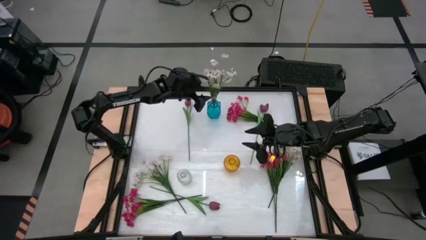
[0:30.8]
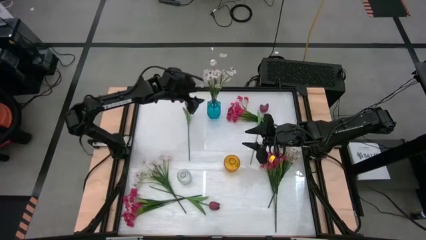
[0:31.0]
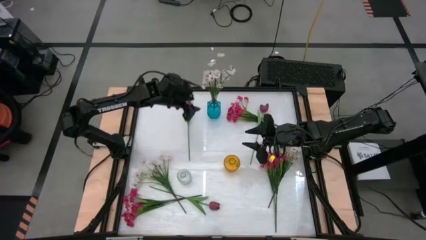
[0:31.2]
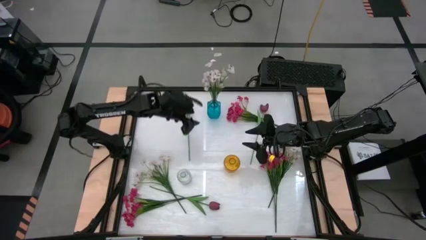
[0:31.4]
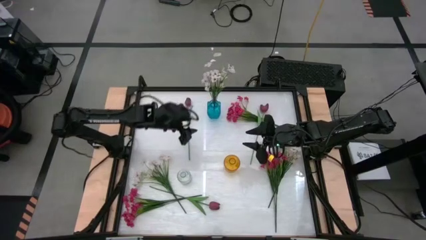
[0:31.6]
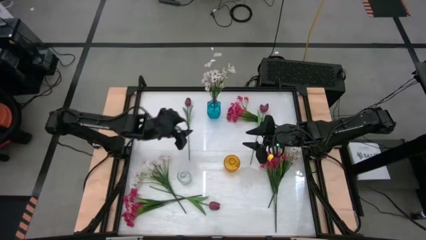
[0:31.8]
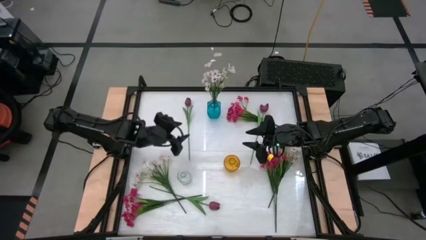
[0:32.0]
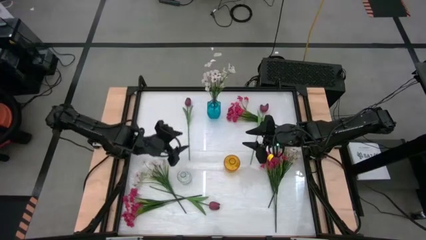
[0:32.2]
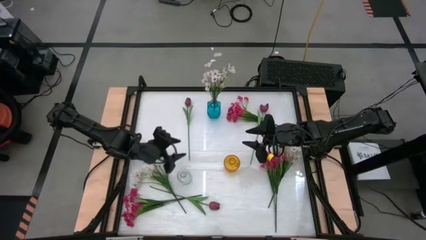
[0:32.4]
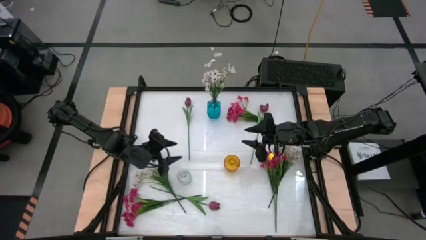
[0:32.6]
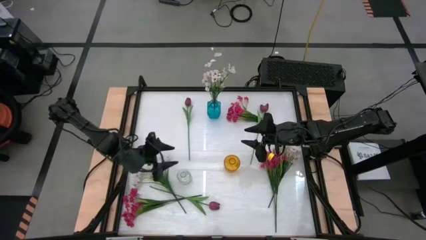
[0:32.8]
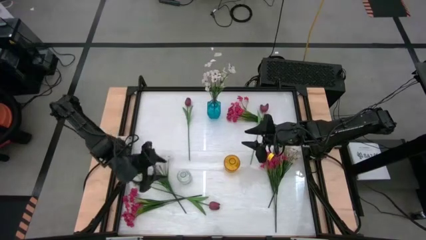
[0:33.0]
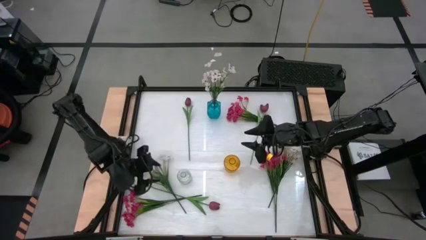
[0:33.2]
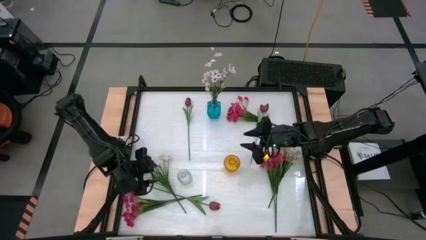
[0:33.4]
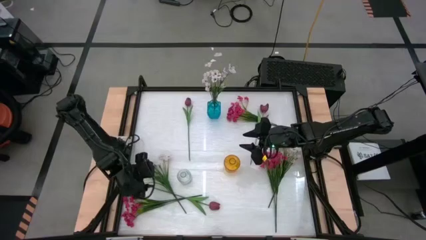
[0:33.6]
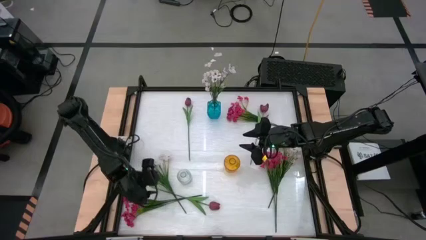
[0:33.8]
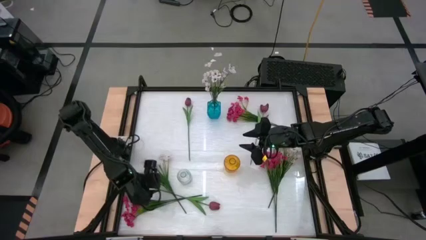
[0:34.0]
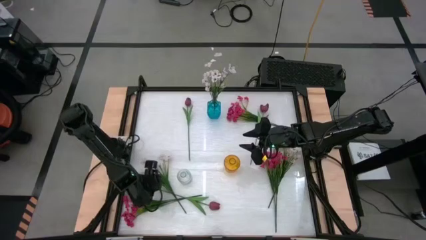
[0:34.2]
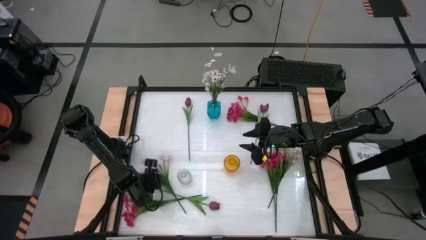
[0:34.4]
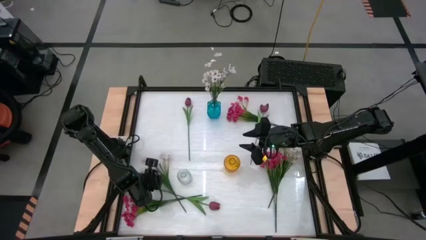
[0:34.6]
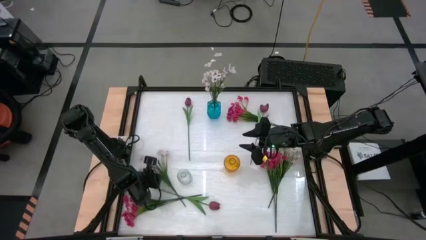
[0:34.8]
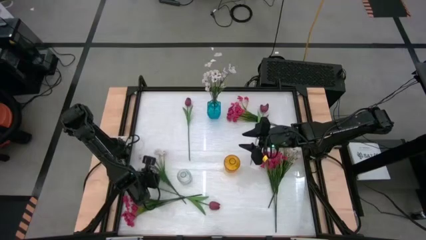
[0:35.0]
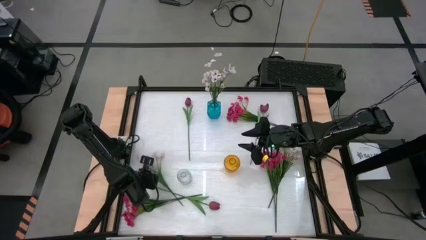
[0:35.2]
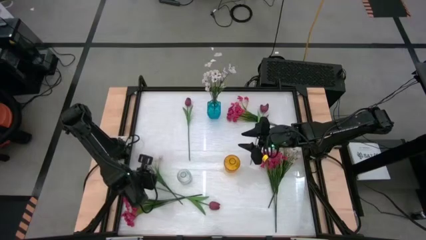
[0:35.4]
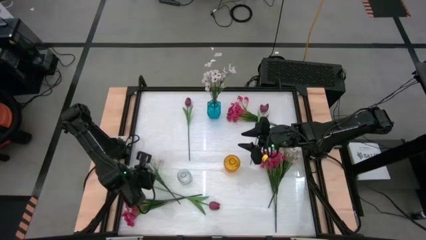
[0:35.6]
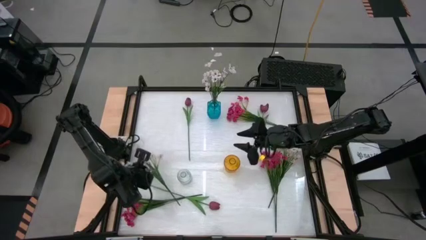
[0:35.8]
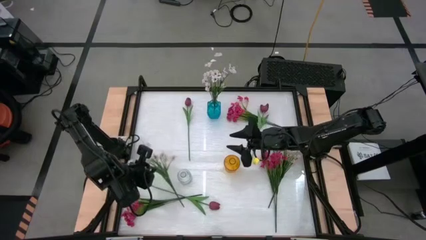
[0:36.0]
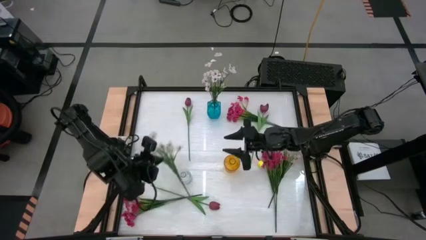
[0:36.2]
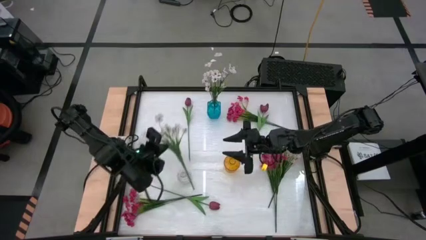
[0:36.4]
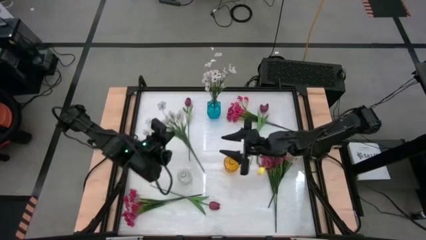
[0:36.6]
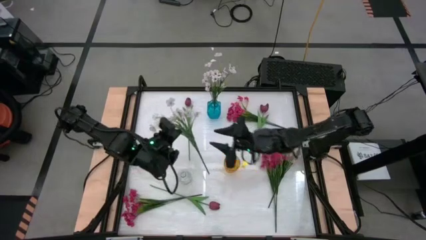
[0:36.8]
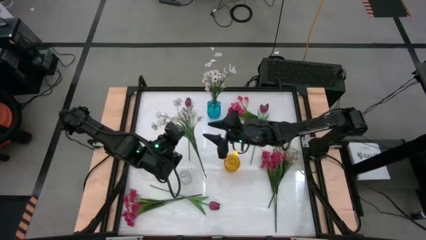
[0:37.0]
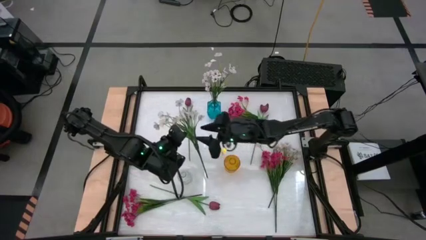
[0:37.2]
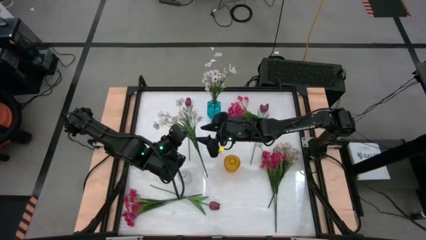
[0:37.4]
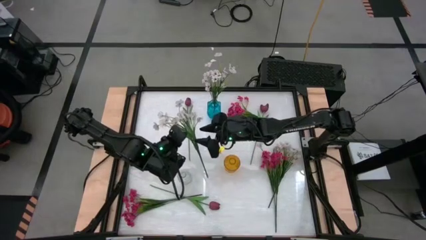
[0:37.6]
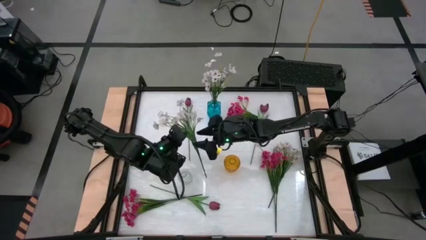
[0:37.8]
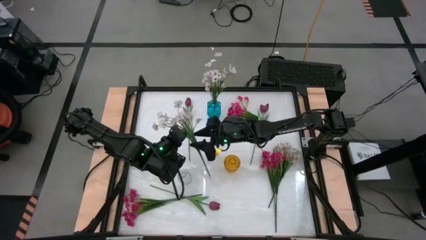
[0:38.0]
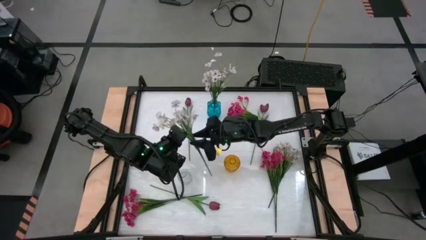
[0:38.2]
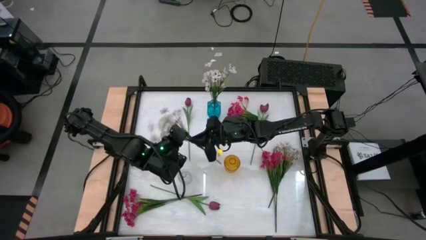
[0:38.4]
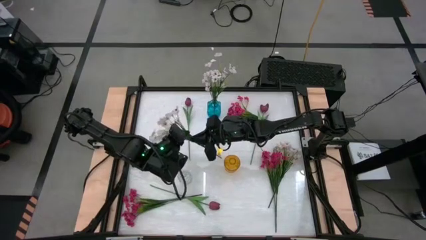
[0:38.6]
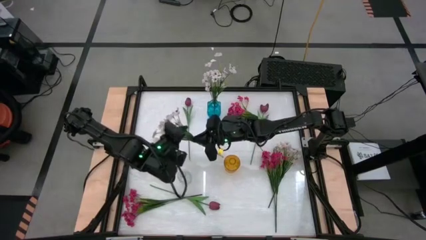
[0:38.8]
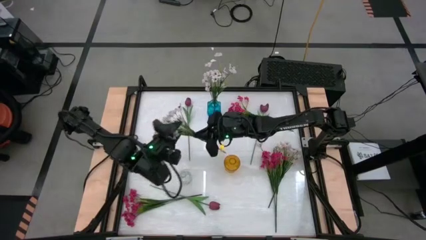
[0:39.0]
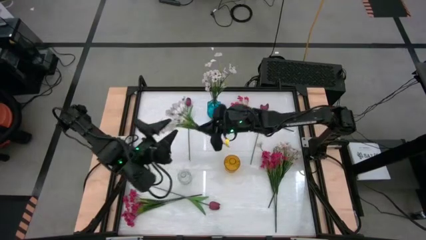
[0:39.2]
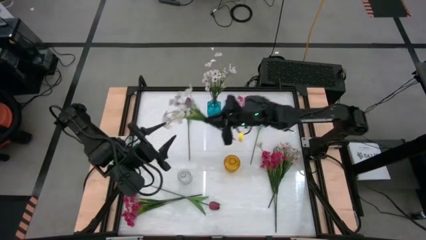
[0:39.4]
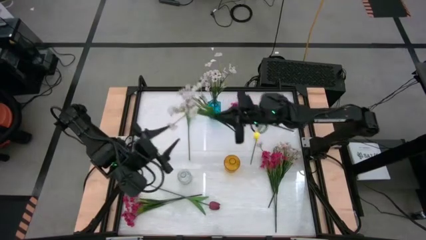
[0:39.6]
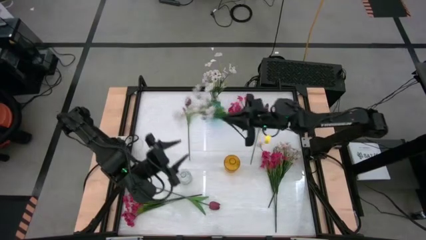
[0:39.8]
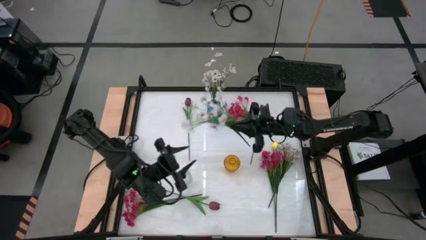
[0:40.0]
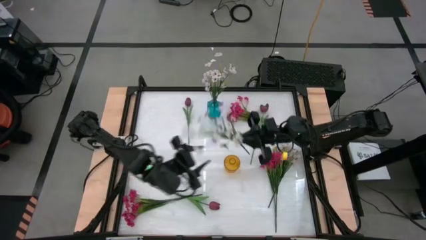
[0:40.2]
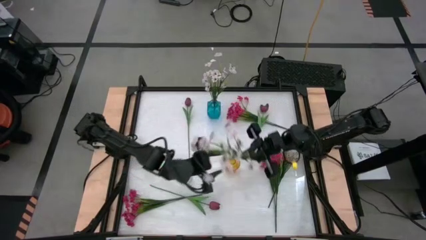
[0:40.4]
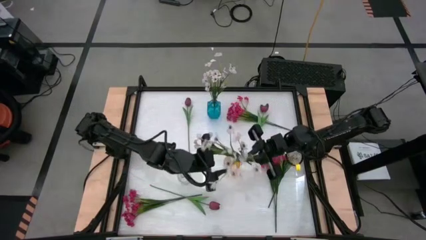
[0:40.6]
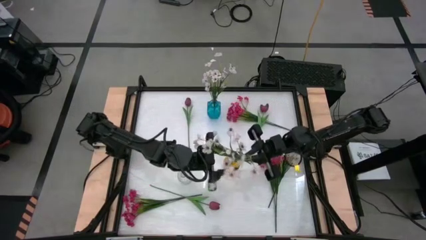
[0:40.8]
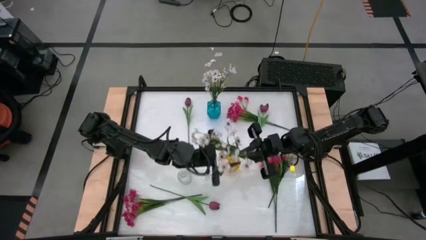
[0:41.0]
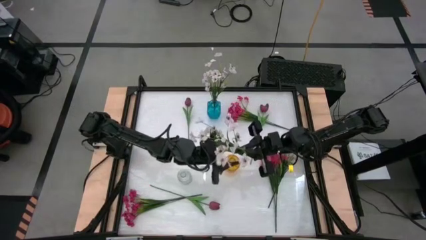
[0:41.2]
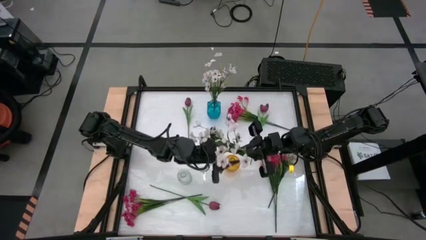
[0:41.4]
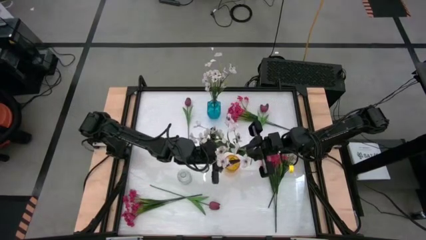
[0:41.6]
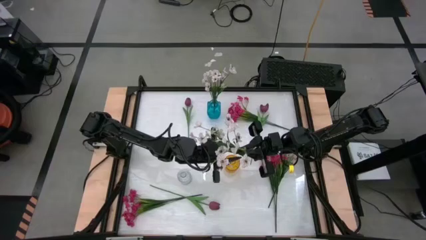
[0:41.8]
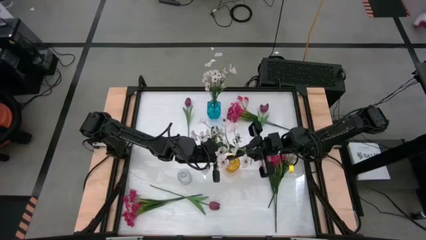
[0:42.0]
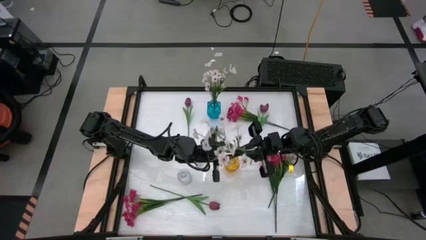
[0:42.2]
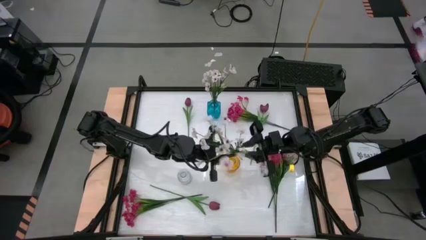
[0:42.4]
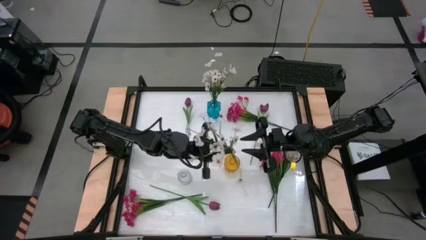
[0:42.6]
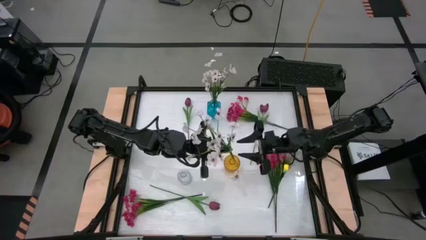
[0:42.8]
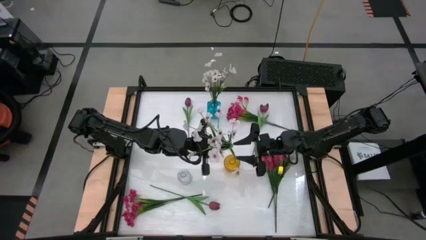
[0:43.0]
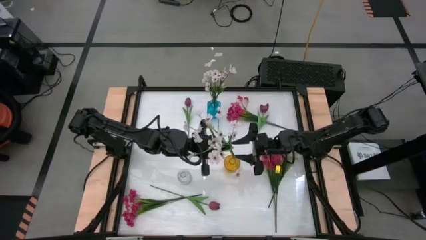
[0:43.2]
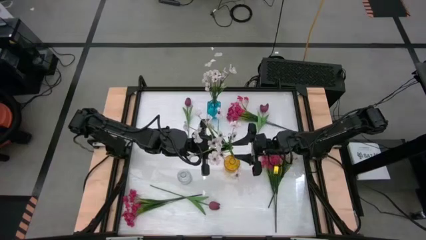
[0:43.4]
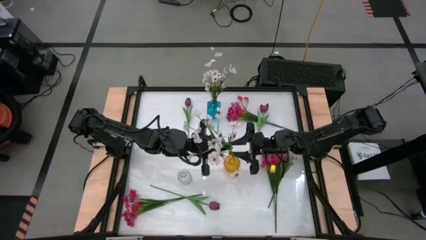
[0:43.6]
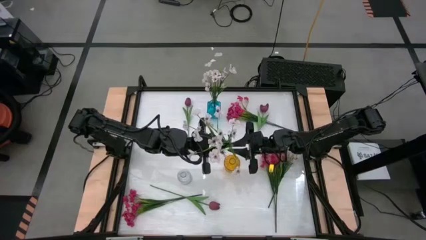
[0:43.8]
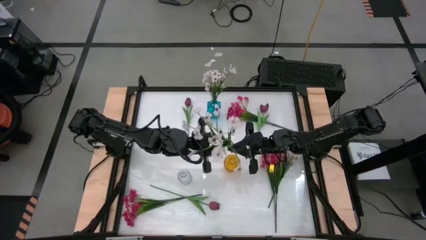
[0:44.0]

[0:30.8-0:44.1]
Task: Sort flowers into vase by color
Put the left white flowers into the blue vase
